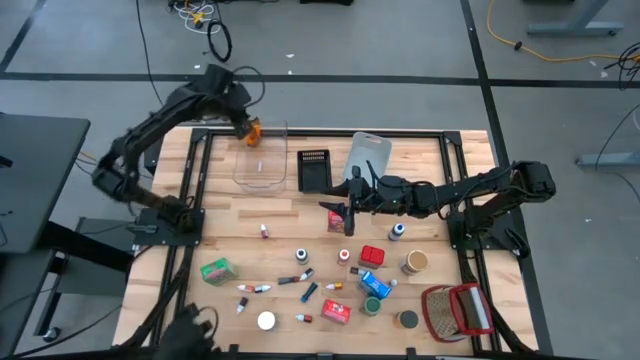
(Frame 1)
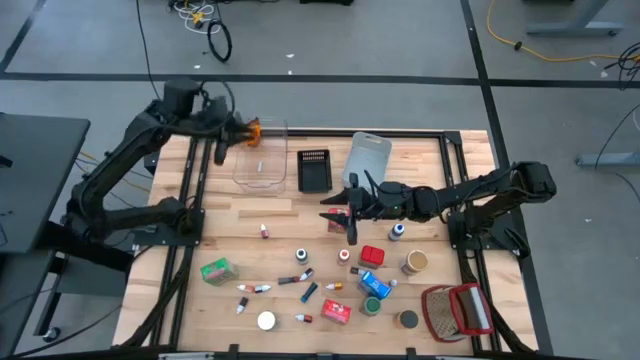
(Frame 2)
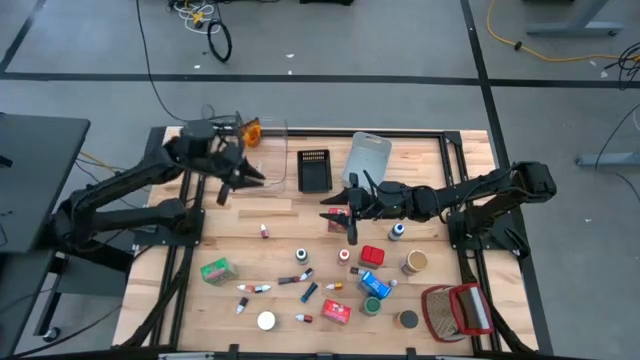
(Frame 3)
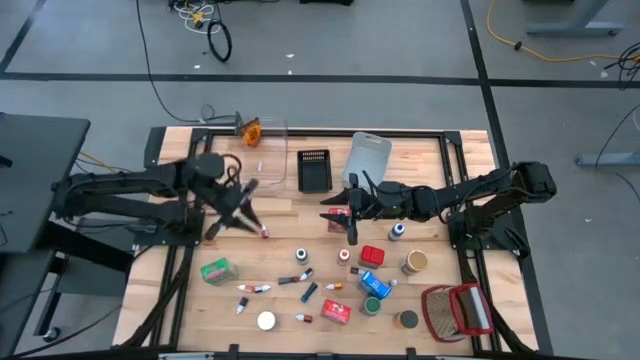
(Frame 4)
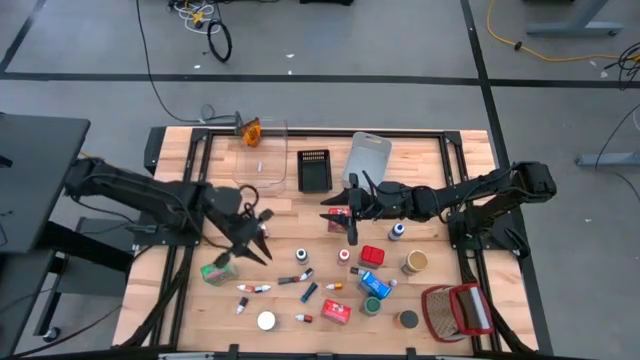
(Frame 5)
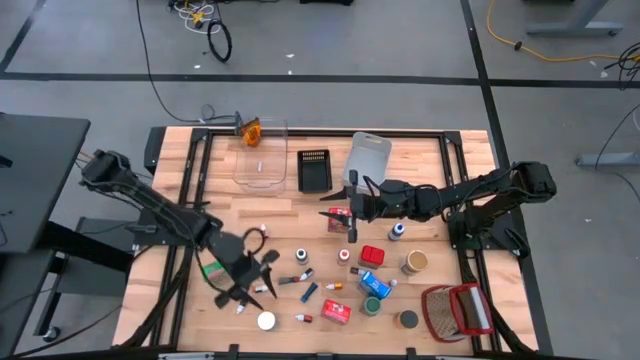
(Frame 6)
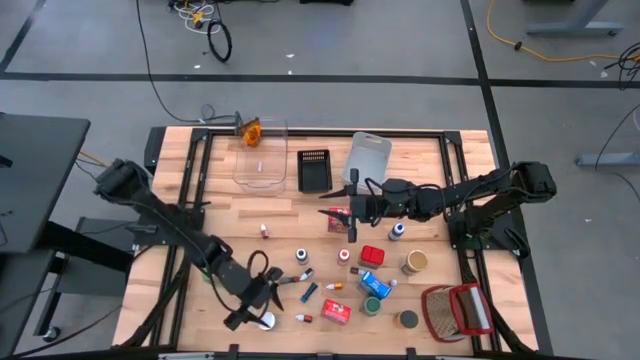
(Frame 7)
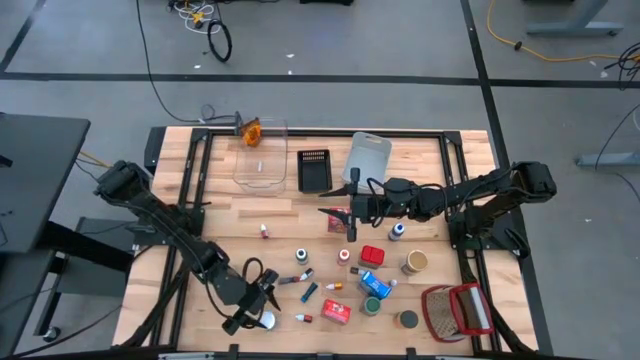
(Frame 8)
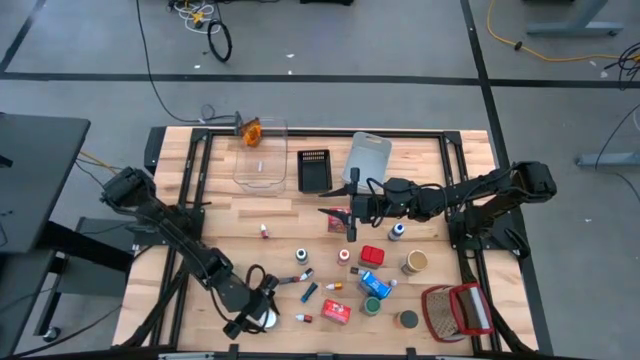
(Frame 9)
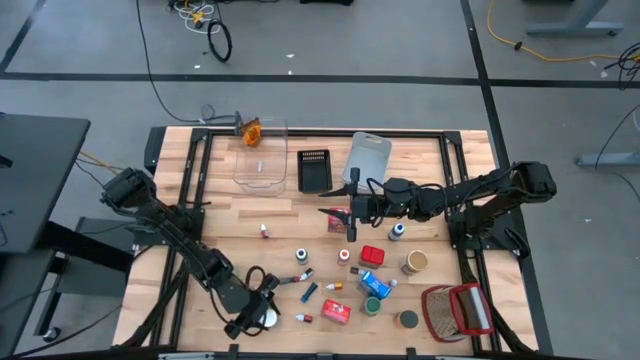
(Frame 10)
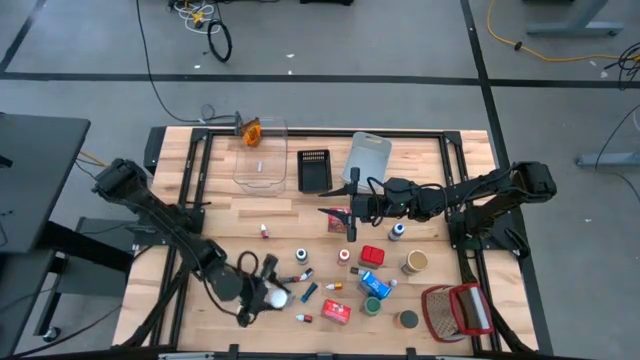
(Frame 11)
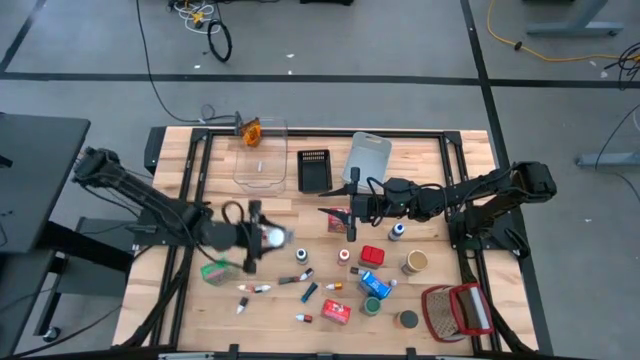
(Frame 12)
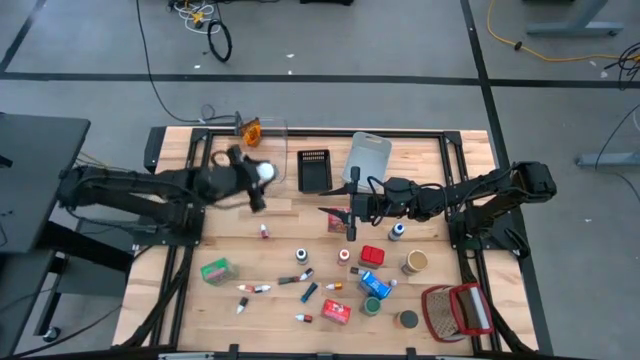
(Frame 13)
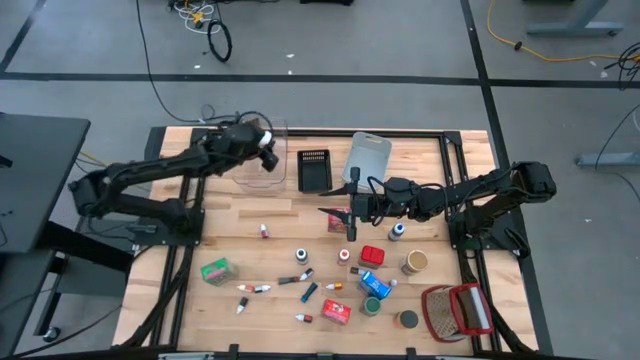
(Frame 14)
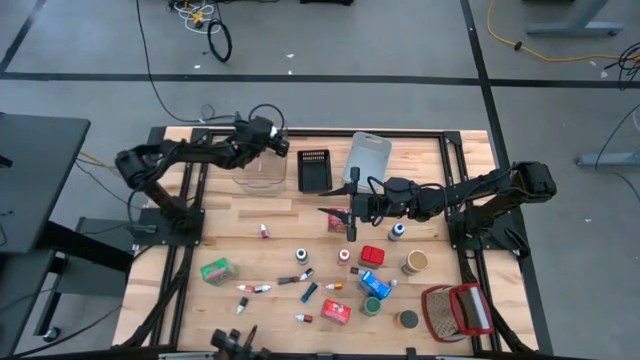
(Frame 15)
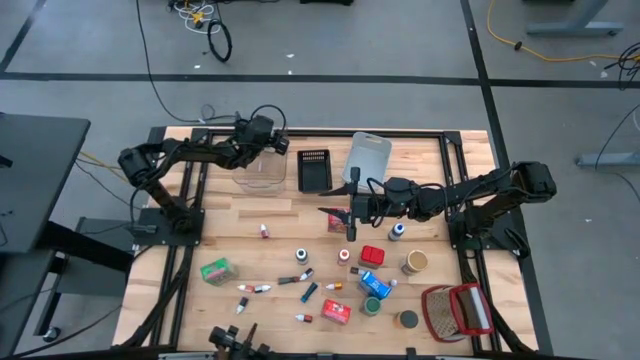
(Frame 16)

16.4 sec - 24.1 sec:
Task: Pick & Place Kitchen Items
Put the white seasoning bottle into transparent bin

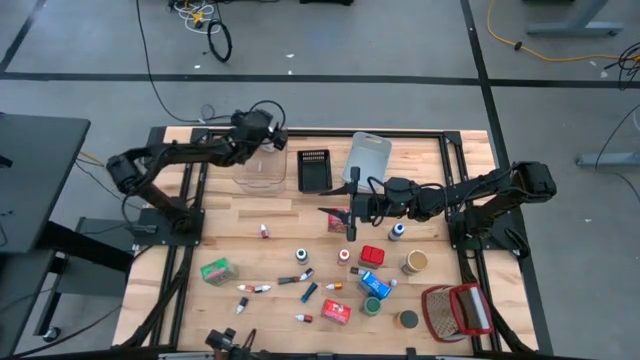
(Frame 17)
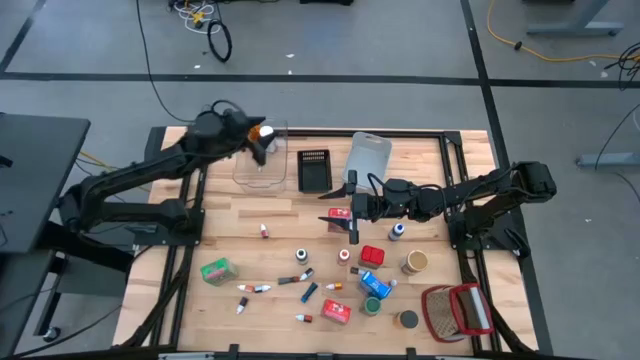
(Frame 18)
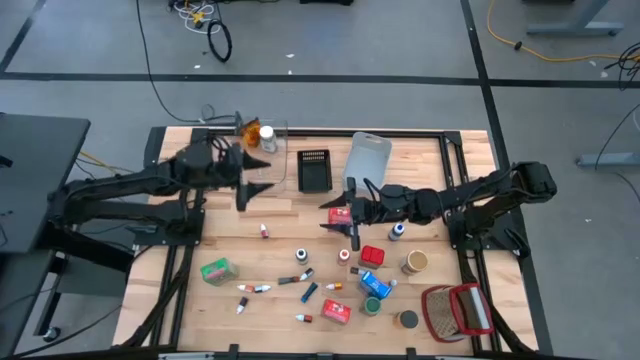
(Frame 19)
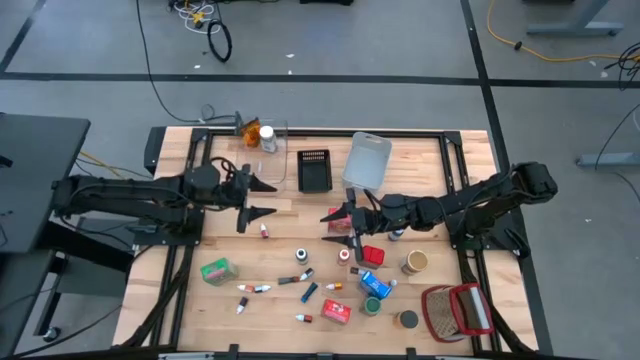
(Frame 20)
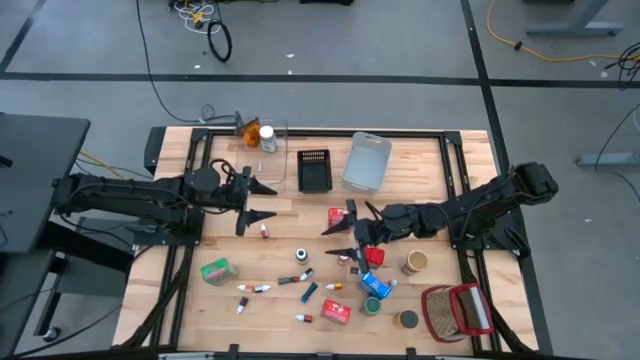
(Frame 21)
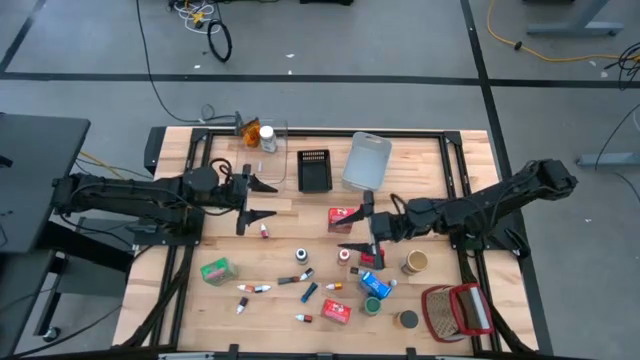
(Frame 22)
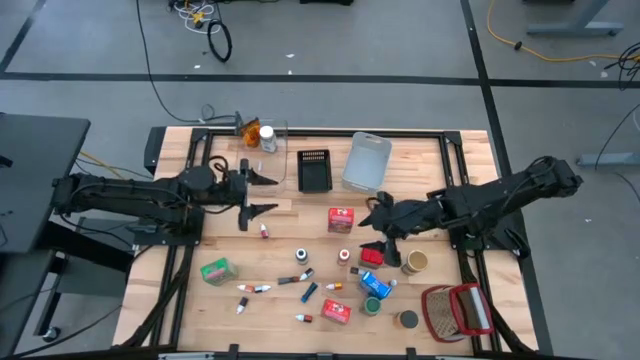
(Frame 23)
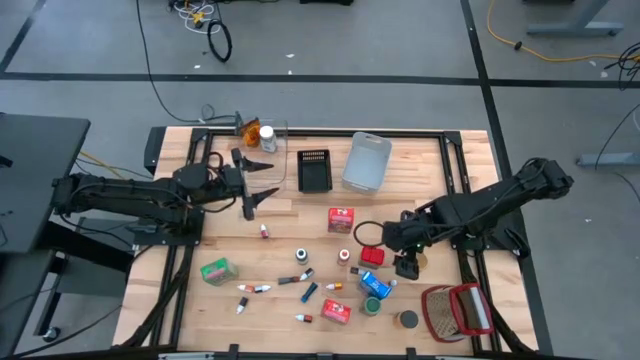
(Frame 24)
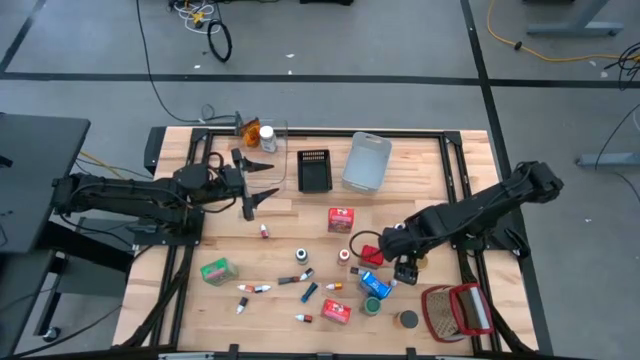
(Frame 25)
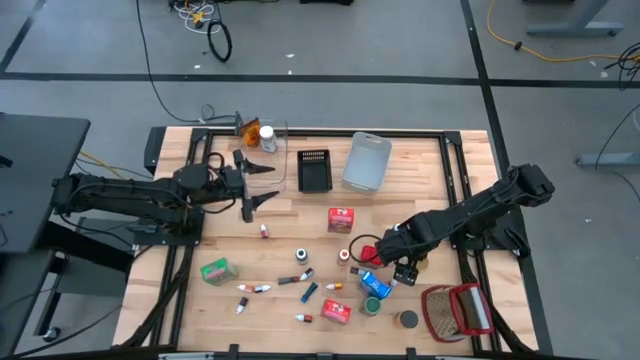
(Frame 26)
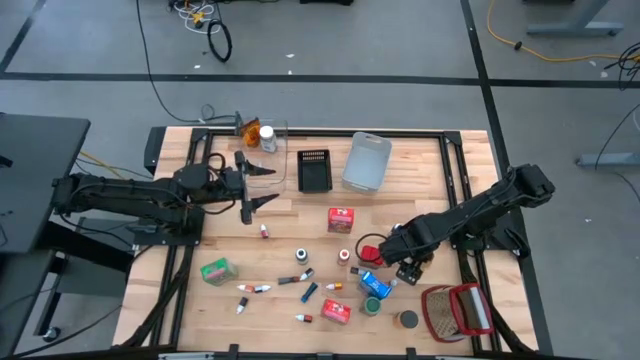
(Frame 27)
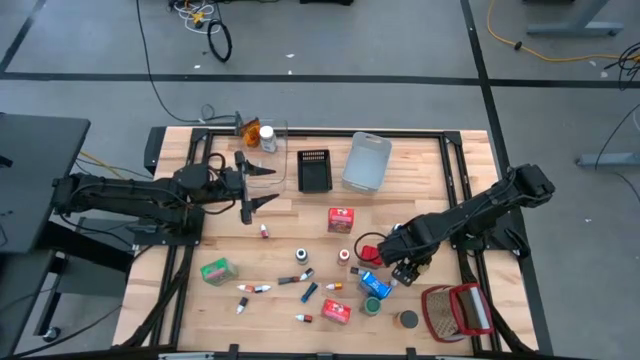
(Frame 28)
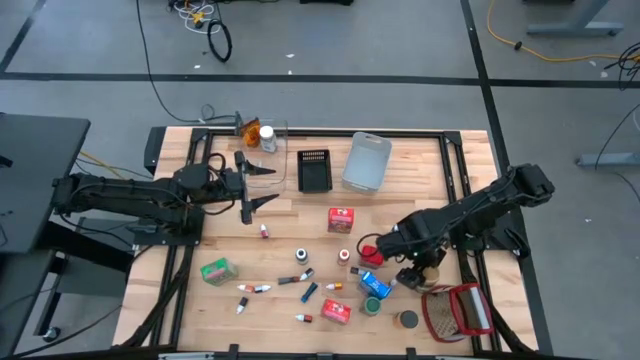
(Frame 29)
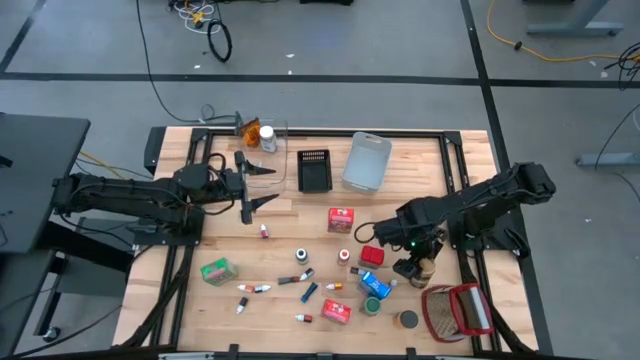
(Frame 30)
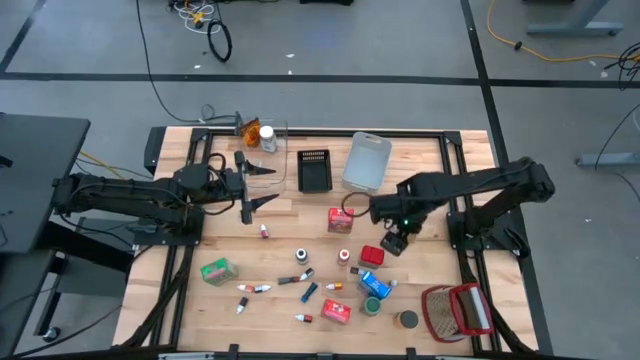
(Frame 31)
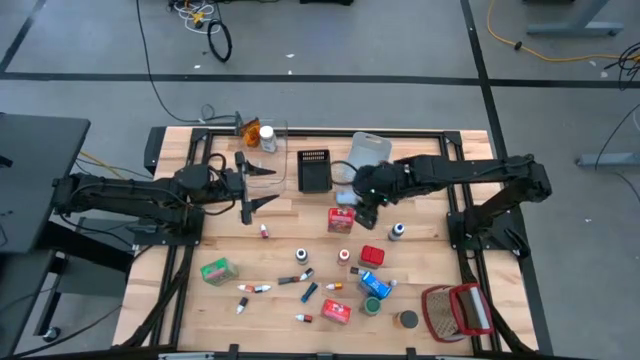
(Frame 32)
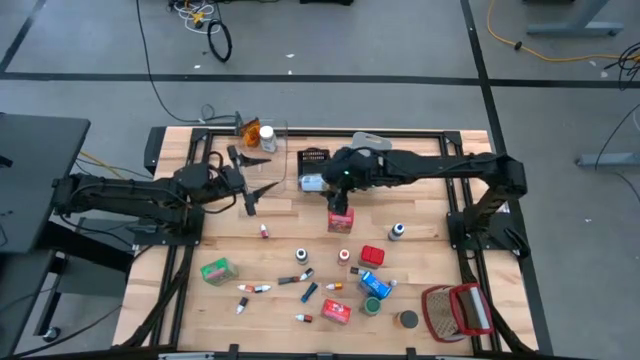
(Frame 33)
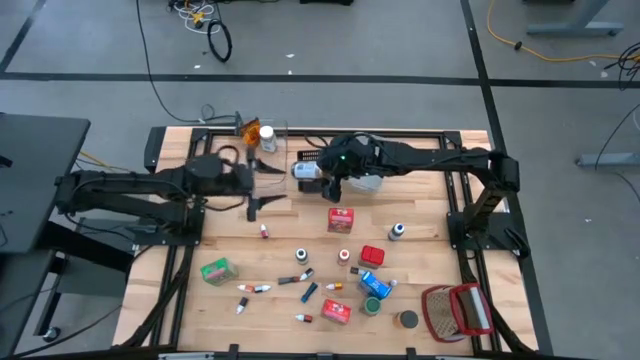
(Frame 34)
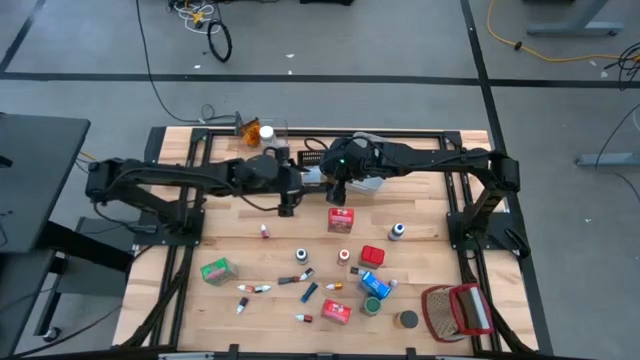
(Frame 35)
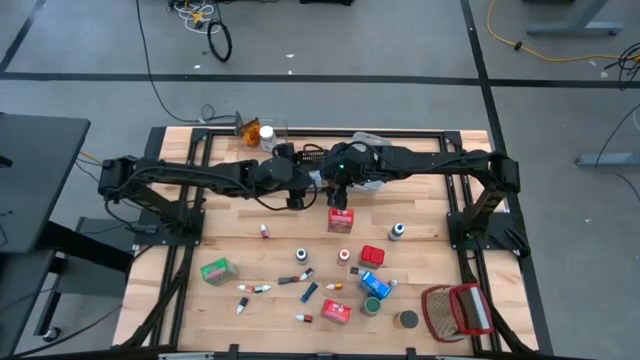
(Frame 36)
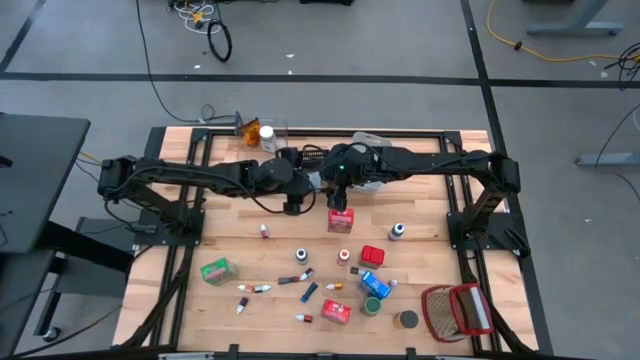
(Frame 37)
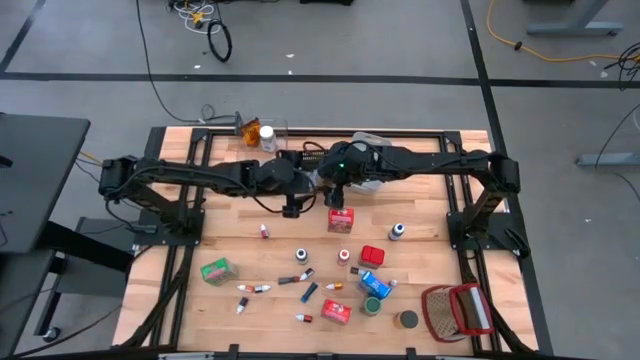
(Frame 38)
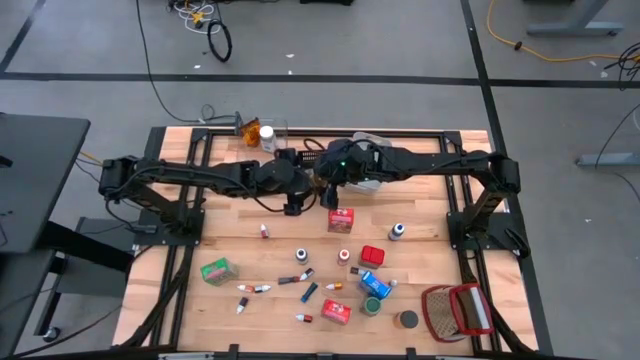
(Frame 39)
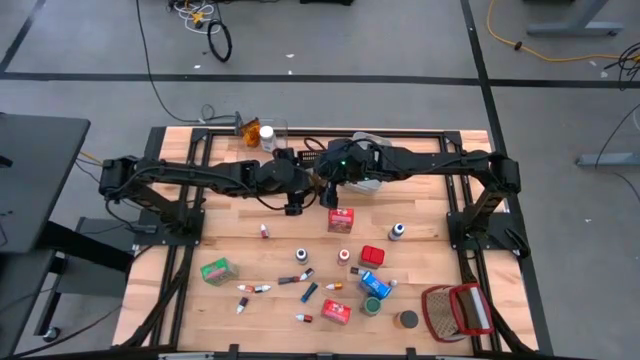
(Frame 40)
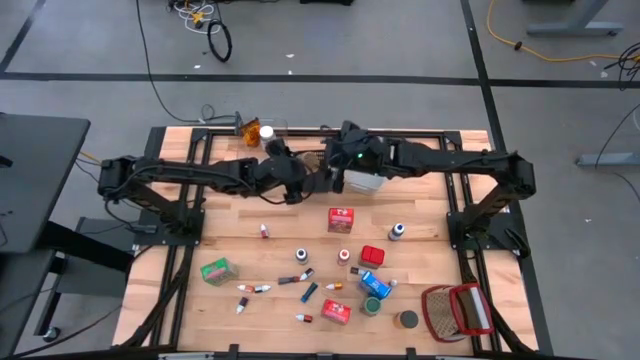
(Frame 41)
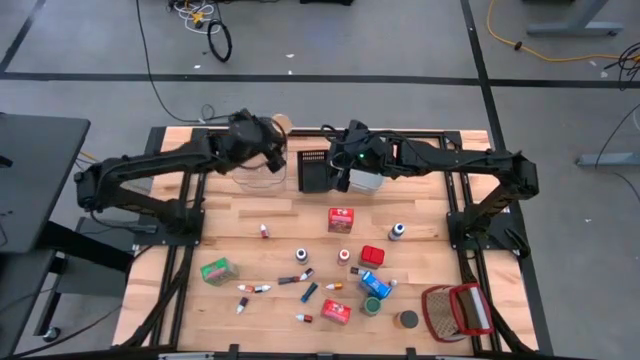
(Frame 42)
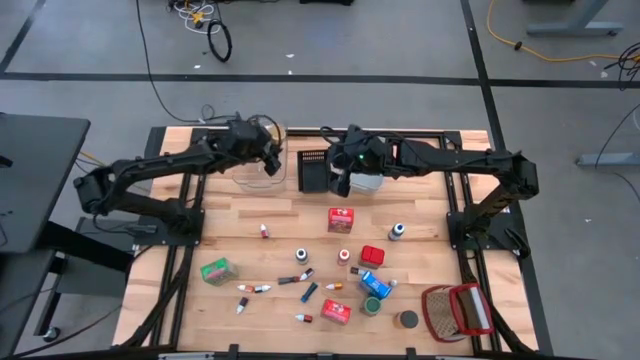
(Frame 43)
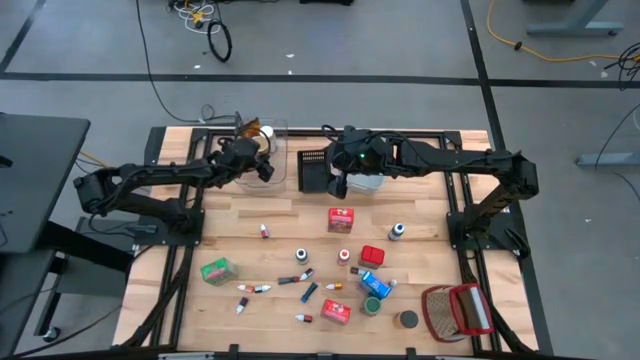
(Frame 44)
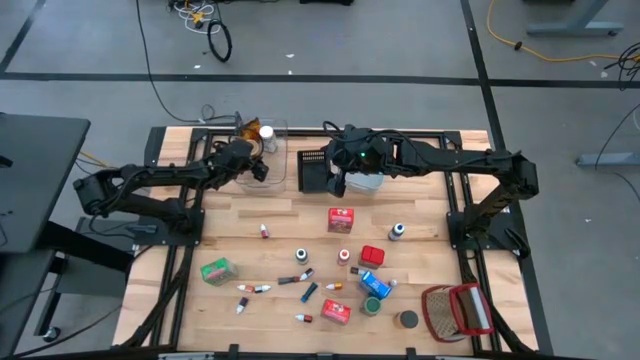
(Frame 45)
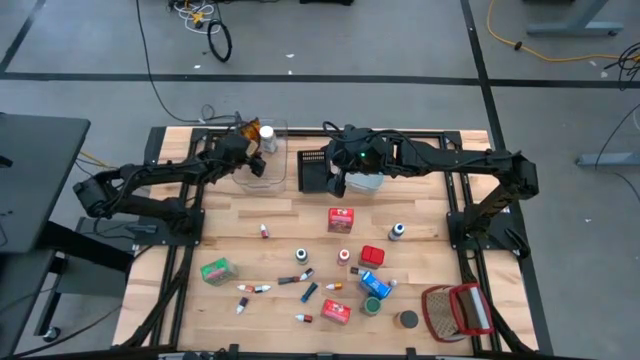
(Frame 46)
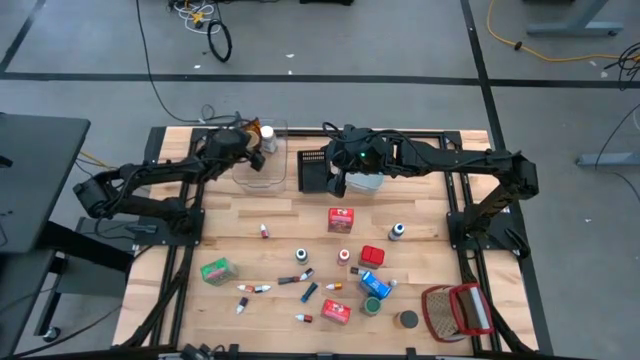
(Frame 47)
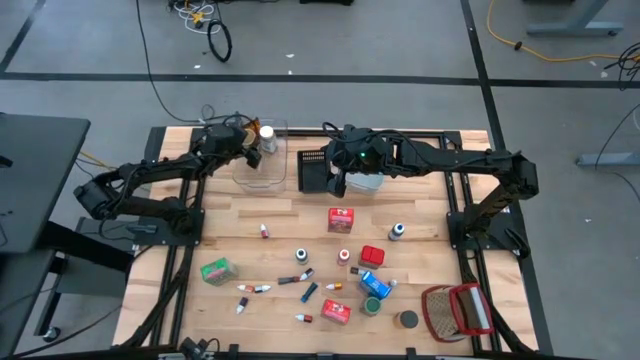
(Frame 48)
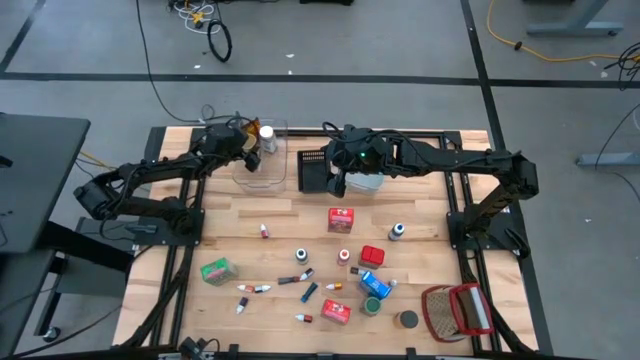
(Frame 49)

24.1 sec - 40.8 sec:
Put the brown seasoning bottle into the transparent bin
